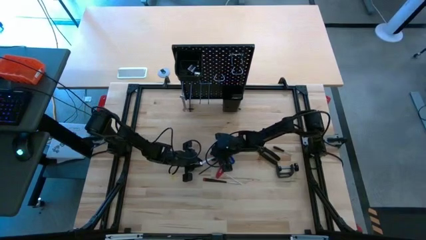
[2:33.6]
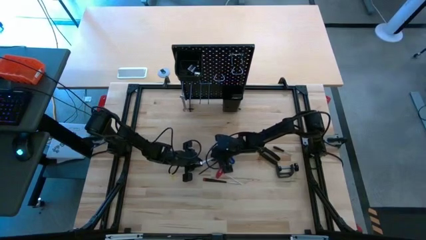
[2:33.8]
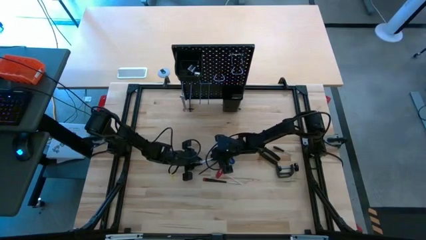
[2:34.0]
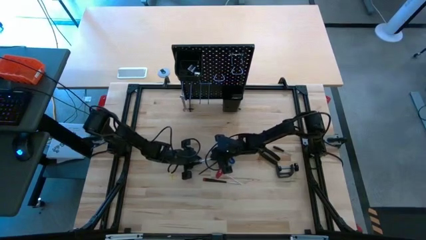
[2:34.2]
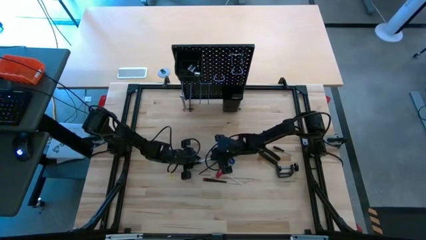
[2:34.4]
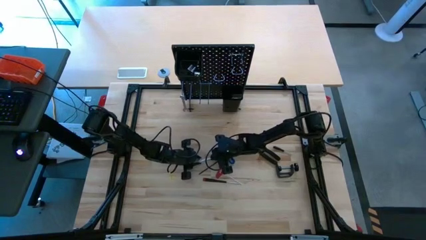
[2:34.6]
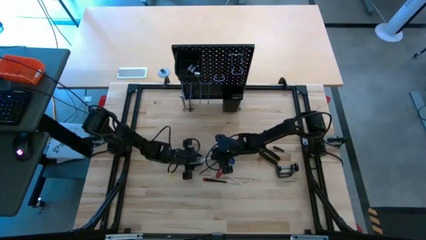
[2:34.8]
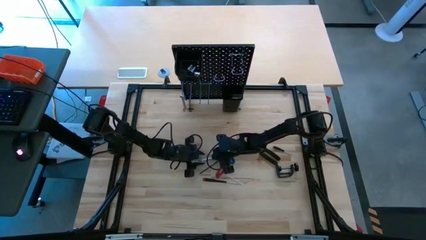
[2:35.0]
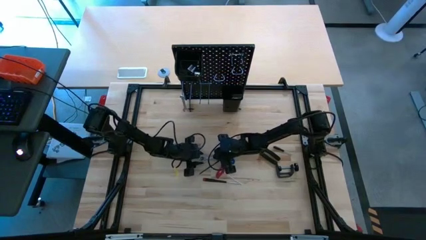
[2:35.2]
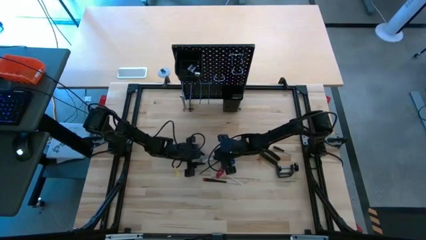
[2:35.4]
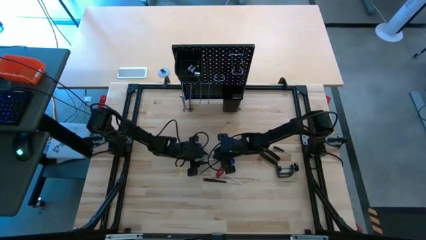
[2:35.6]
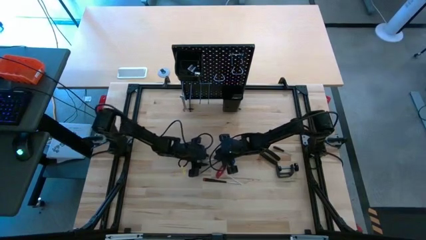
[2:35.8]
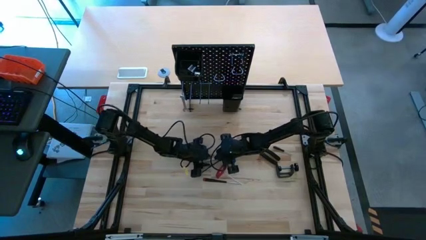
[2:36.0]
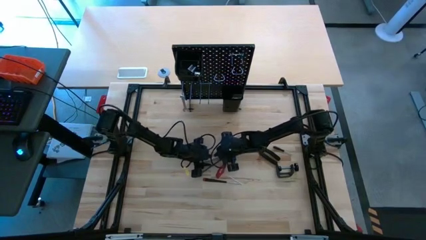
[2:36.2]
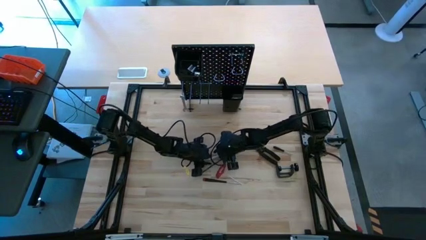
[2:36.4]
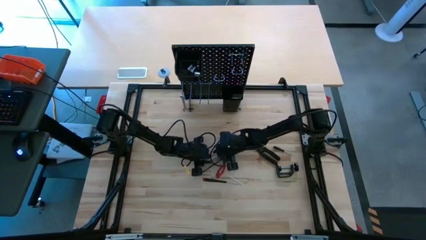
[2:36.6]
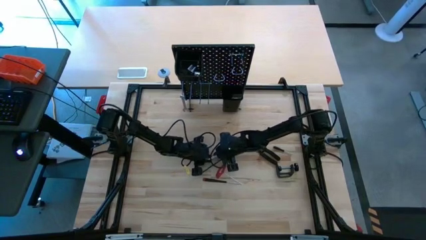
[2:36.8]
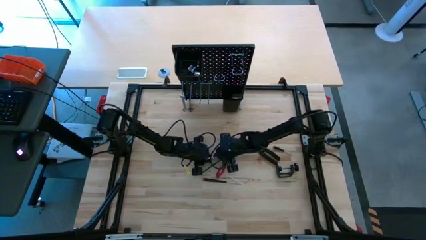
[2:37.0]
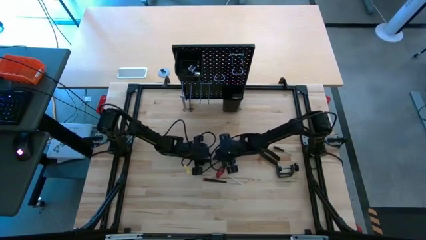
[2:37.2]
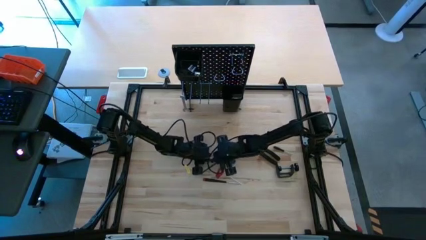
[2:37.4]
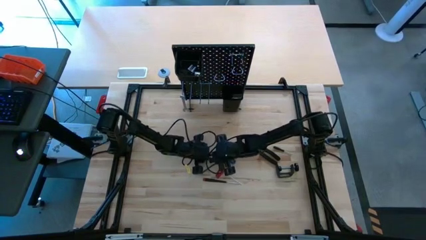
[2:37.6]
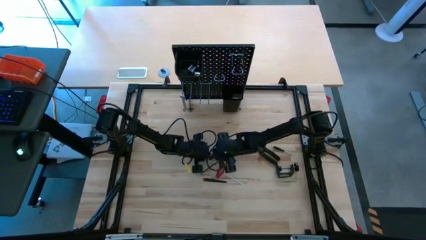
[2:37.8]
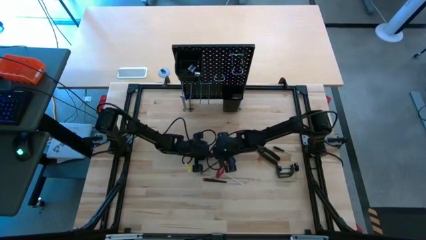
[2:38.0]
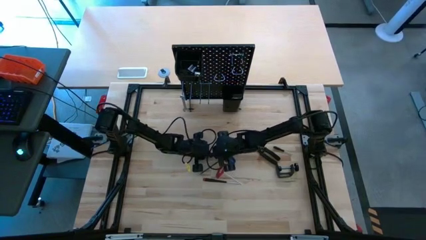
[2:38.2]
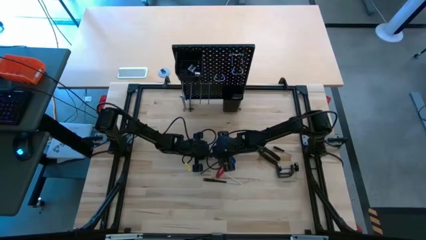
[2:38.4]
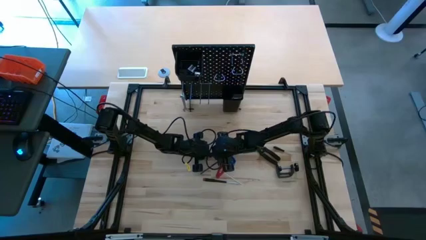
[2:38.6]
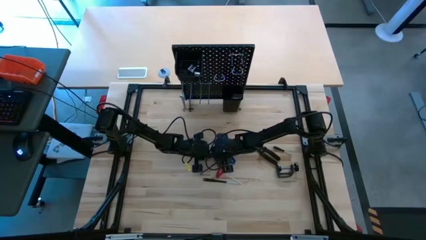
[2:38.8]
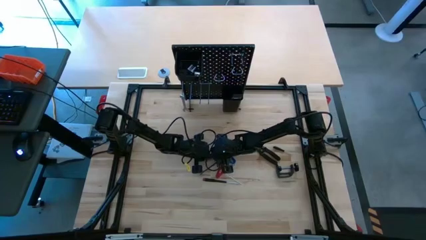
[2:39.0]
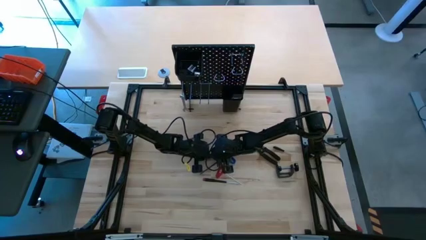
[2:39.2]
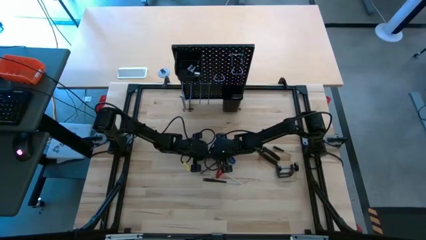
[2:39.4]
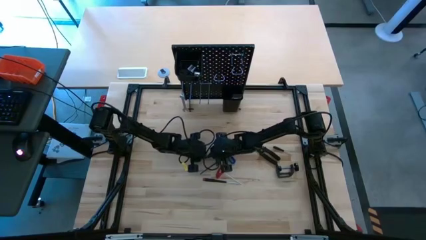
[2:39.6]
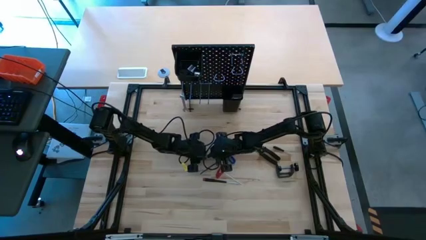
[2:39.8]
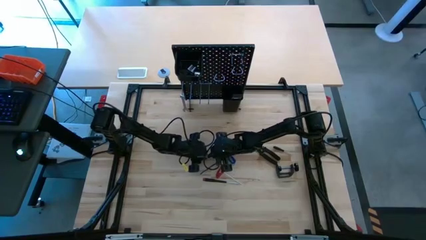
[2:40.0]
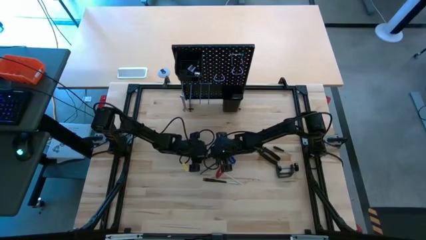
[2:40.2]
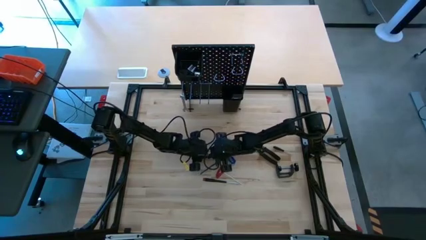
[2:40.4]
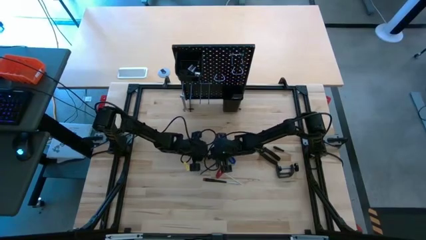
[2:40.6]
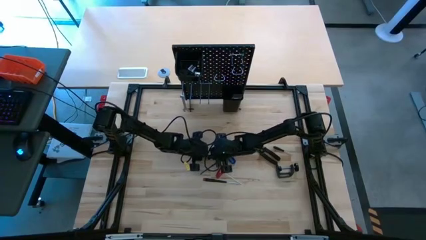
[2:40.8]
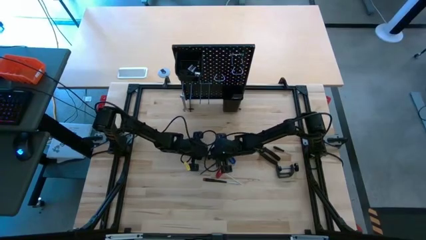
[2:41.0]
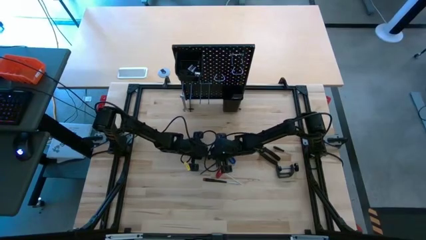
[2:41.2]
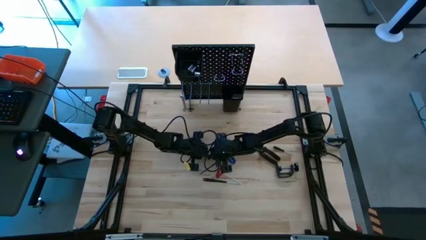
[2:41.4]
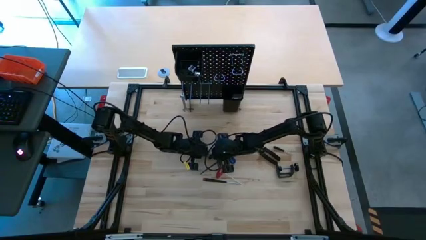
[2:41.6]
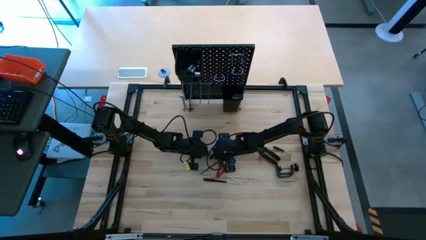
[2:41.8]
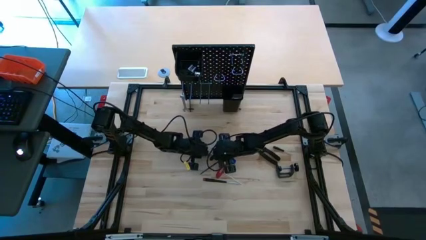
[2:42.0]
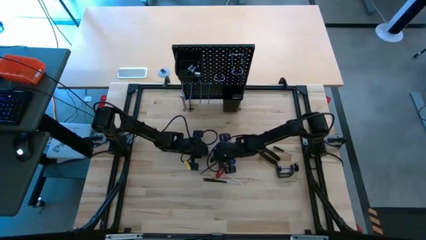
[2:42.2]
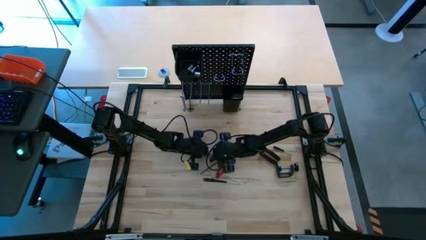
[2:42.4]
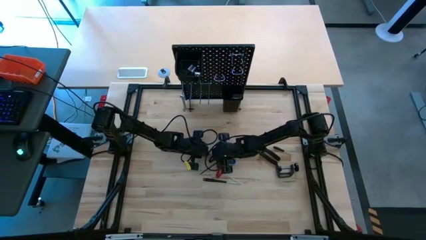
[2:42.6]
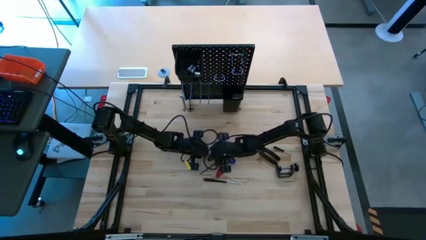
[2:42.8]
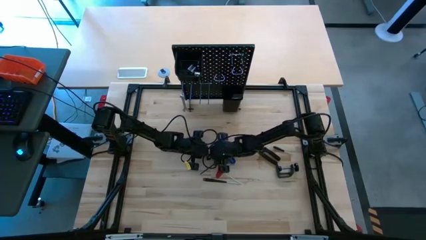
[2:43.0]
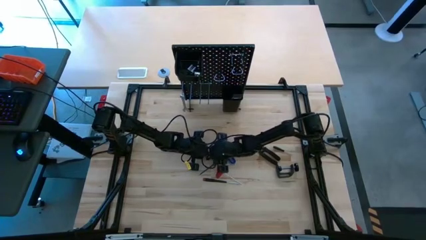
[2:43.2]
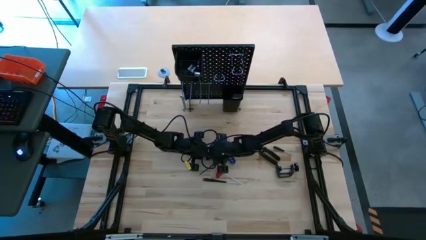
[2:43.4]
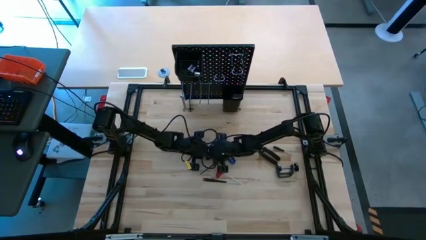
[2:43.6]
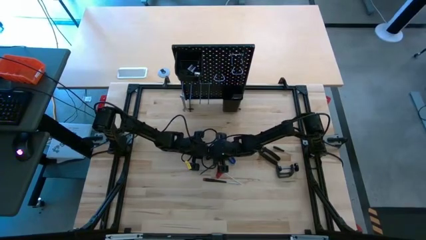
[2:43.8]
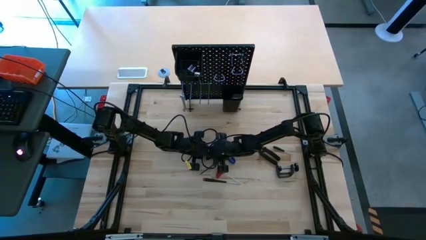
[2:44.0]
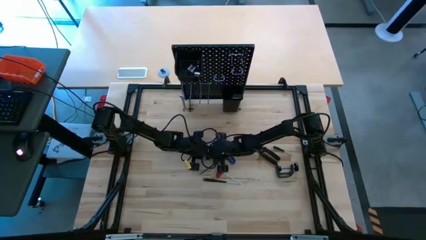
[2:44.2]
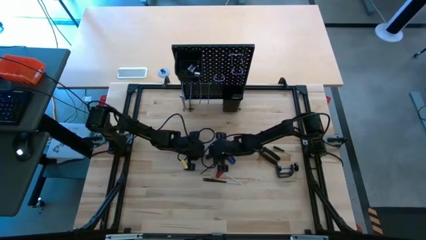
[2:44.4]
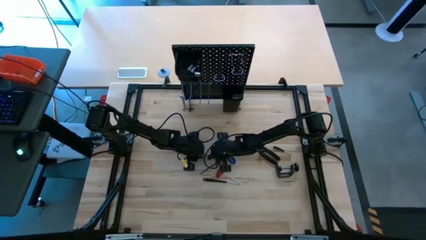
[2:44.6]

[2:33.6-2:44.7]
Task: Hang tools onto peg board
Hang the wrench on the pegboard
